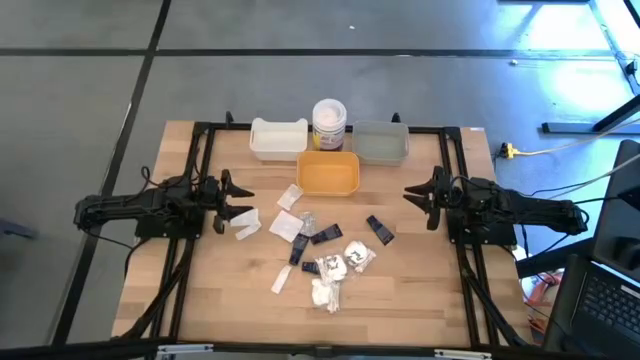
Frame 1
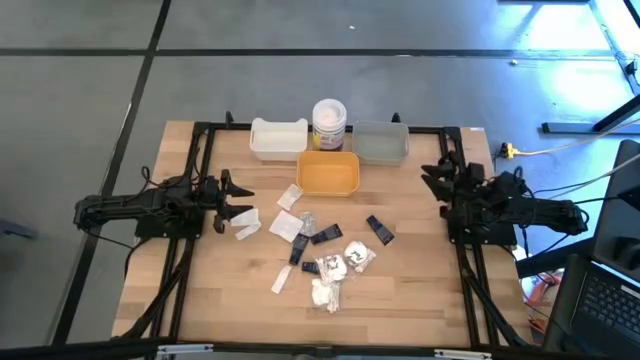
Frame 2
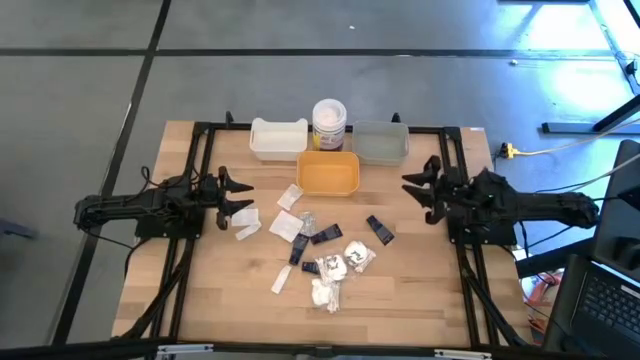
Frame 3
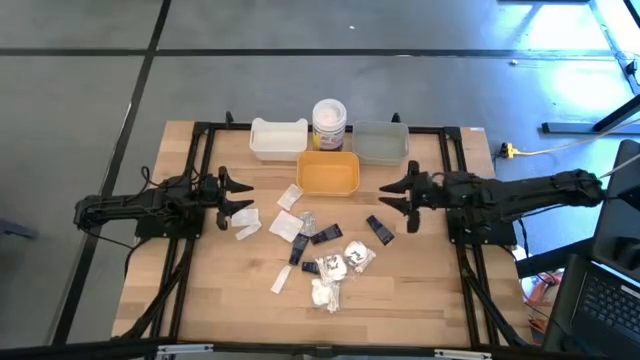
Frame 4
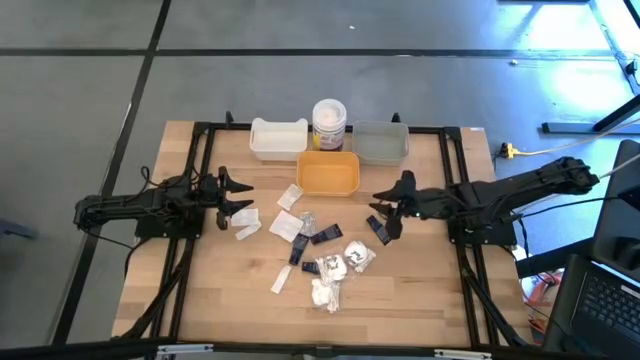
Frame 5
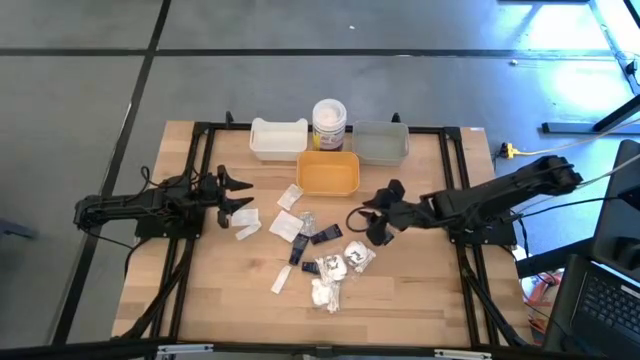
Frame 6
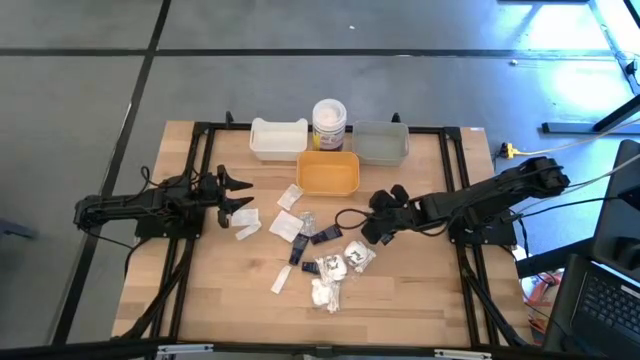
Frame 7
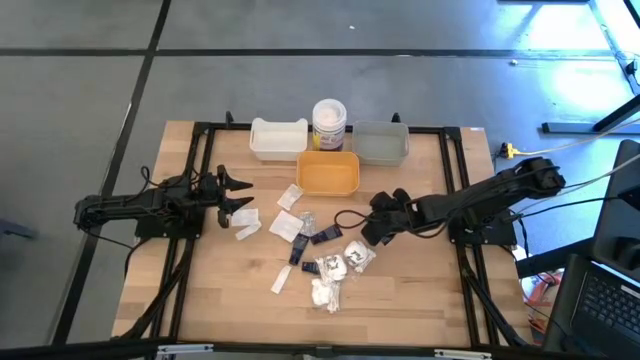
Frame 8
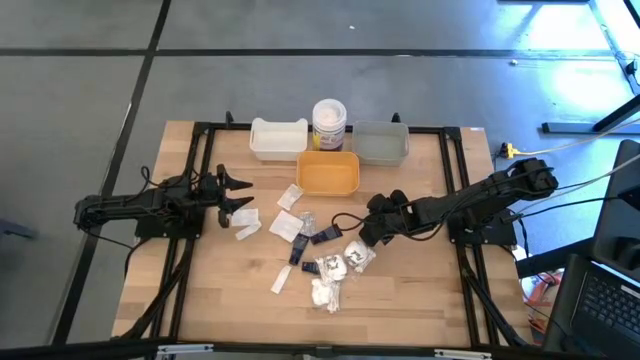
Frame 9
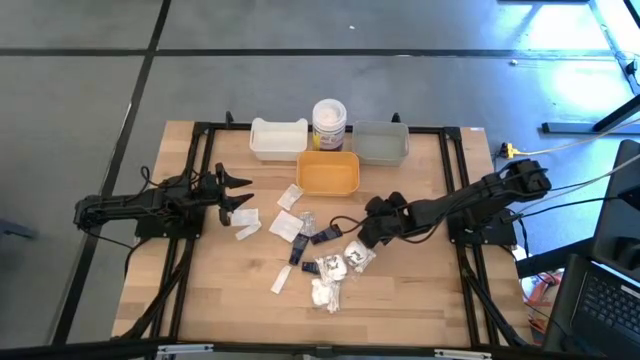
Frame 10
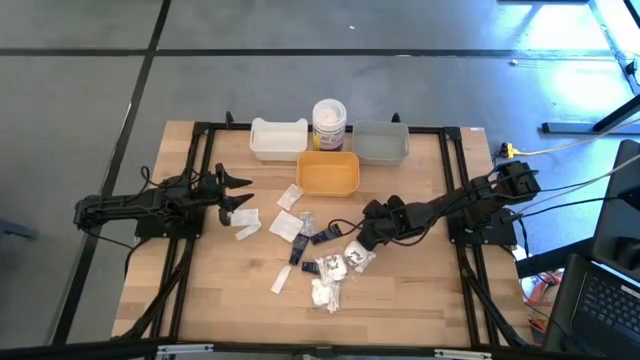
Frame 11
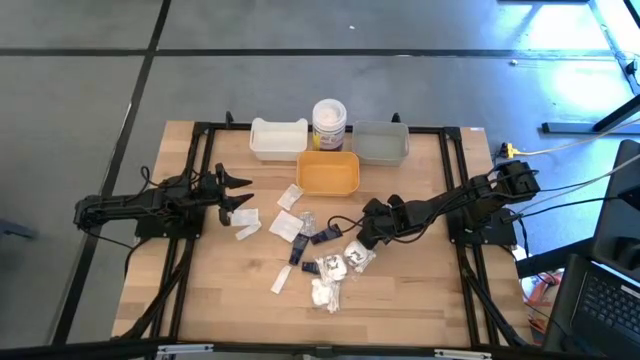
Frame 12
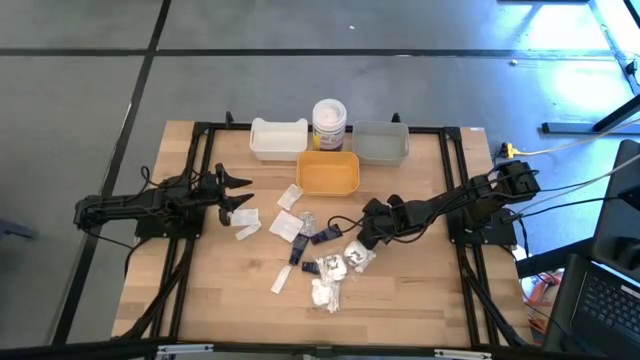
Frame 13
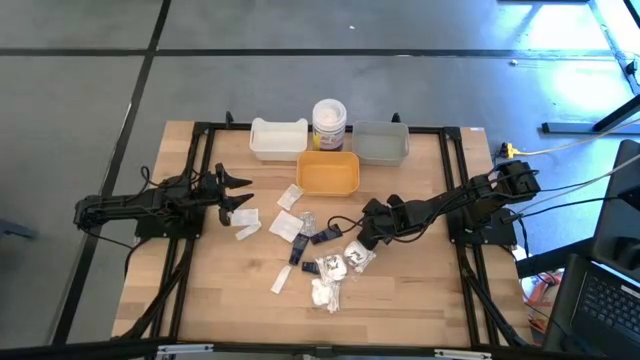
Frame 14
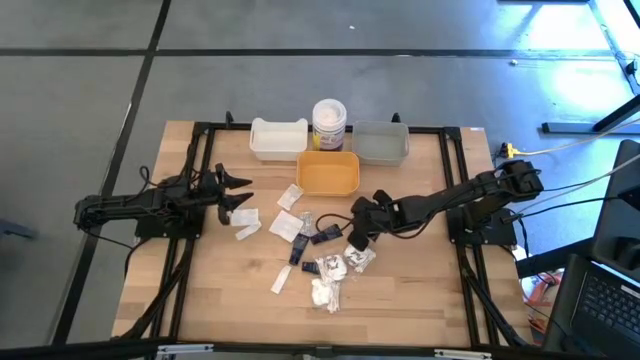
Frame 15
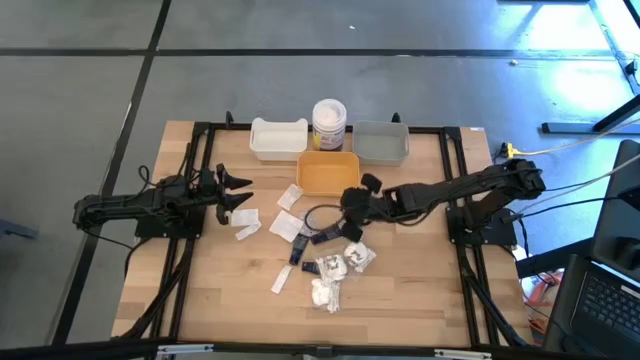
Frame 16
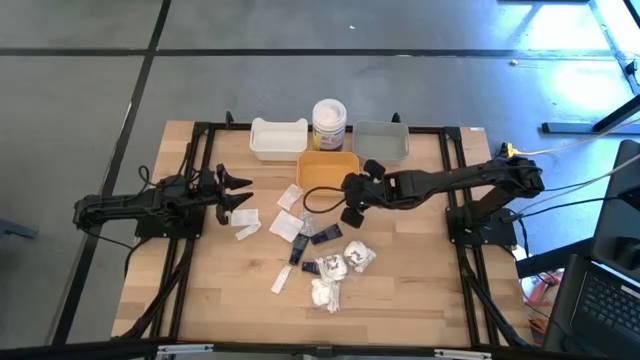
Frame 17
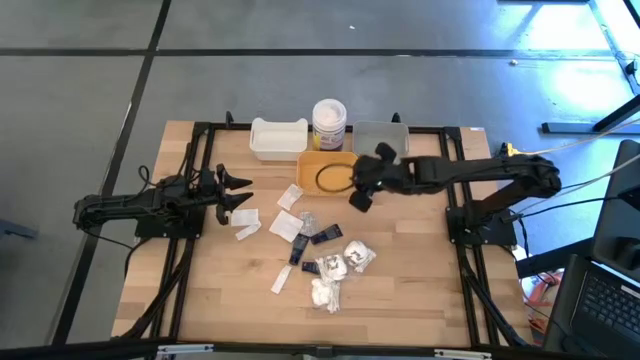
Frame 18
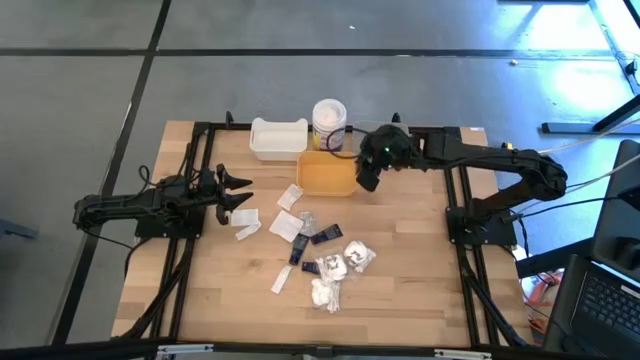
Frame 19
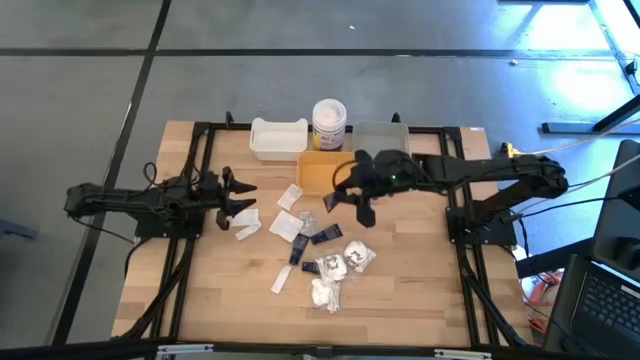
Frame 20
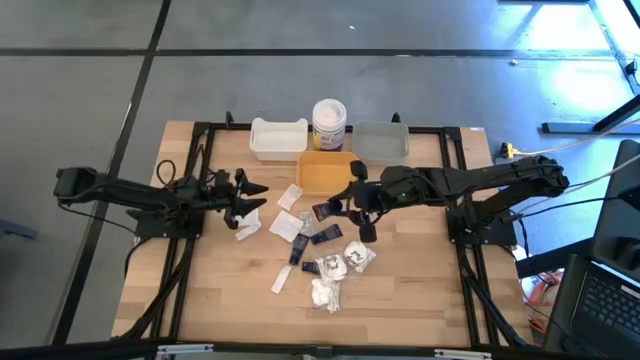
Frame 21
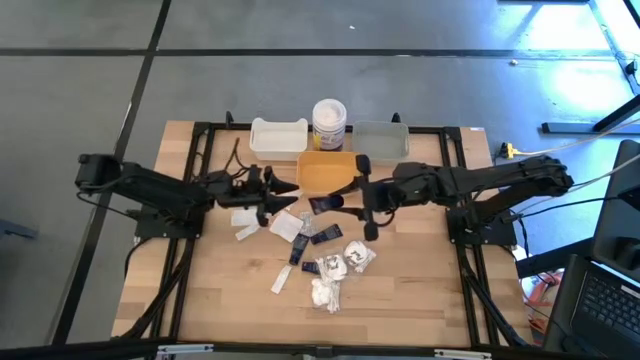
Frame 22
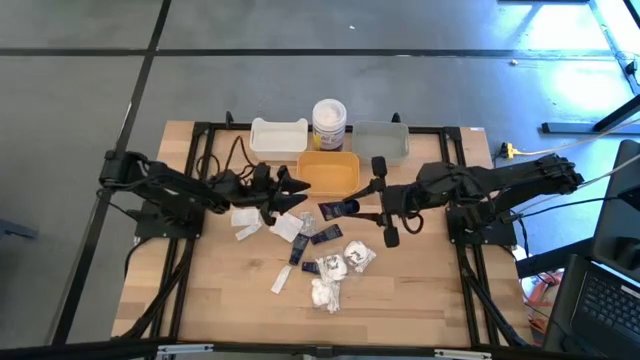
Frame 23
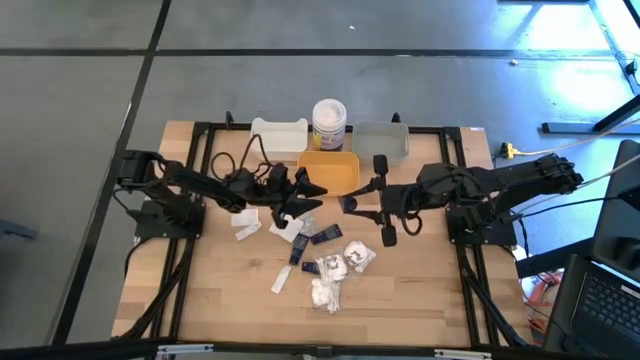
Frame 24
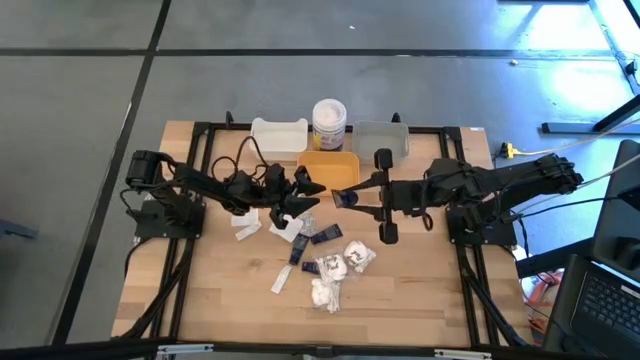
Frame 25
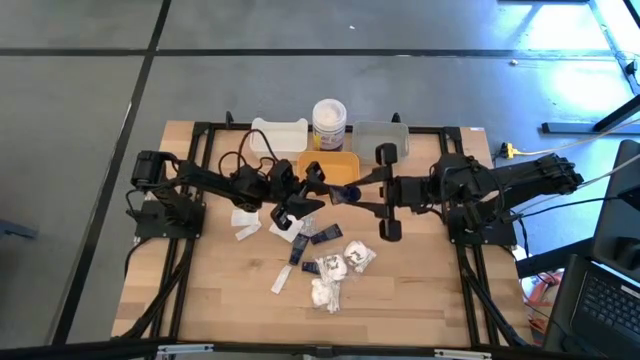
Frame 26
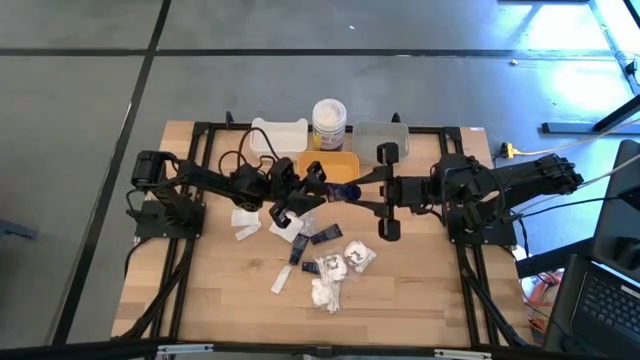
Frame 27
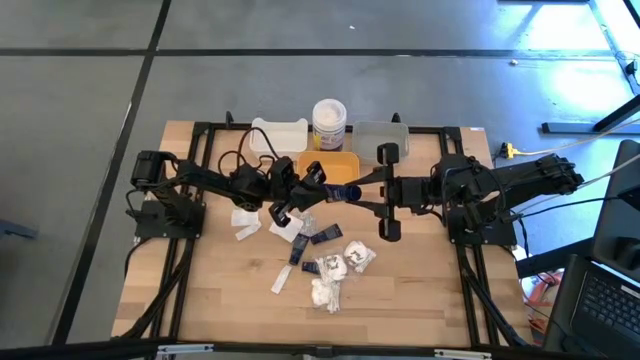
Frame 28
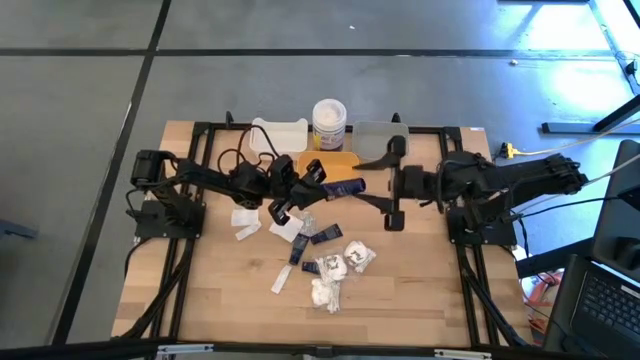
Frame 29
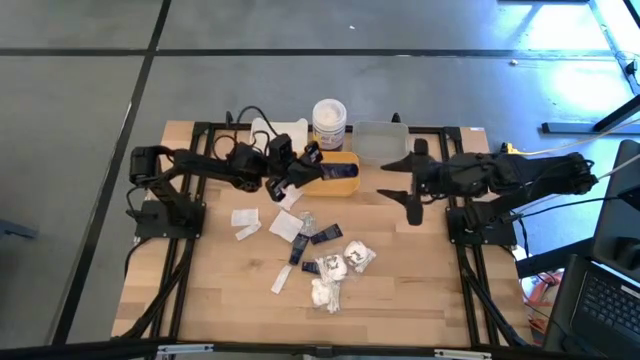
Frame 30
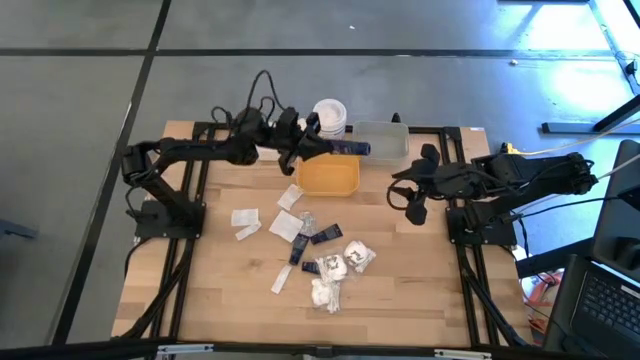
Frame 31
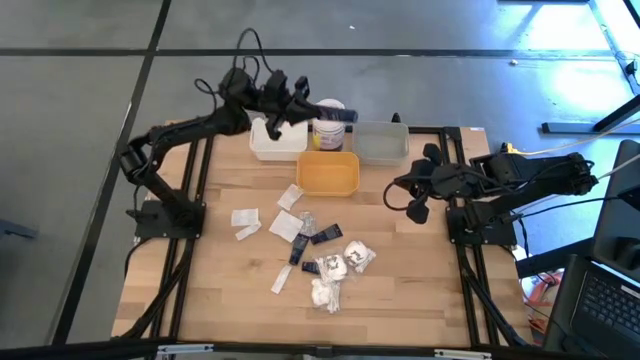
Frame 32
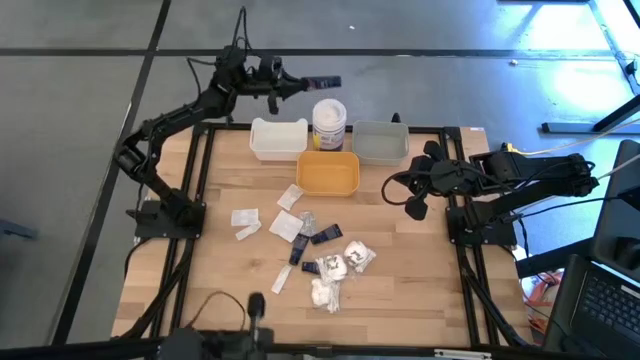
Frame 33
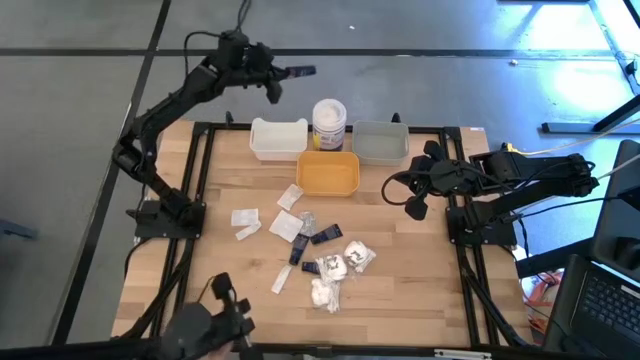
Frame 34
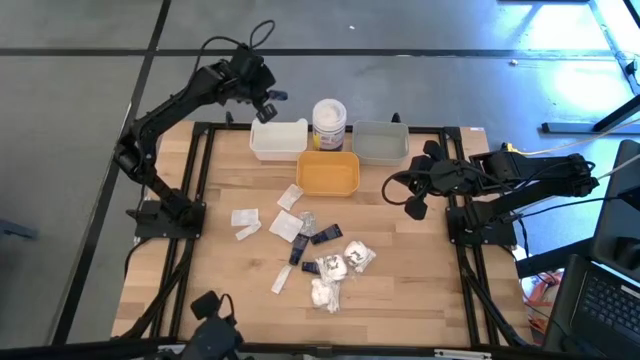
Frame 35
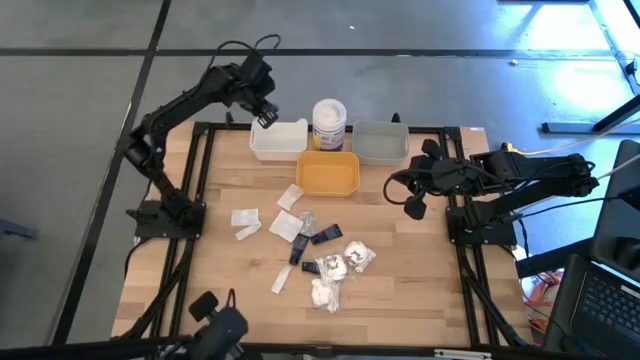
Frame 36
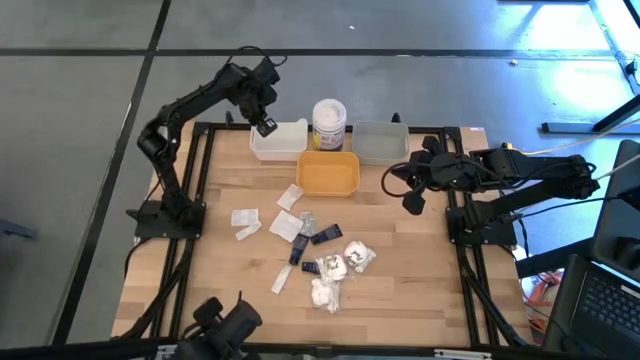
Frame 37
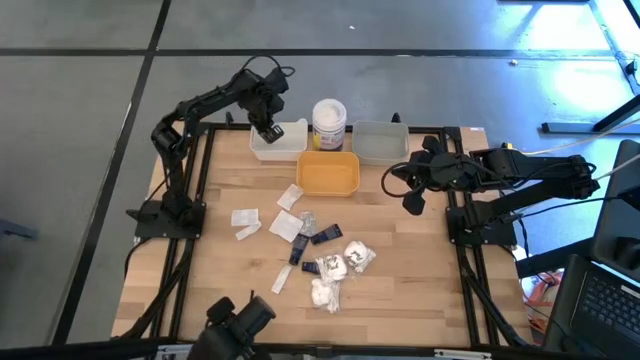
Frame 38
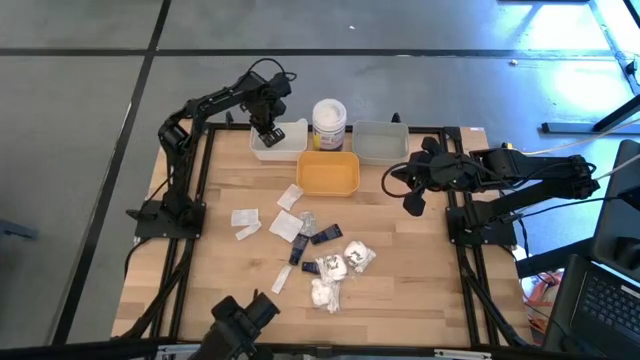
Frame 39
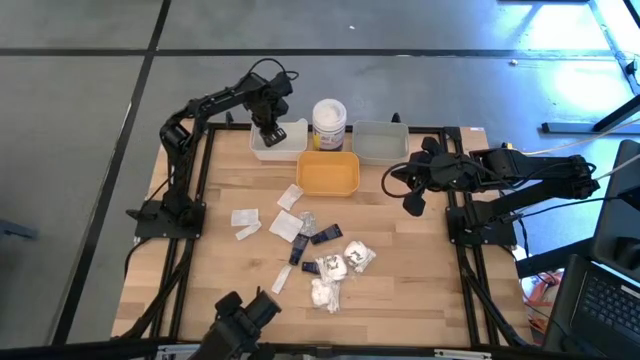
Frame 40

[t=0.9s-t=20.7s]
Task: Pick & Place Travel size toiletries
Put the blue shave cream into the white bin
